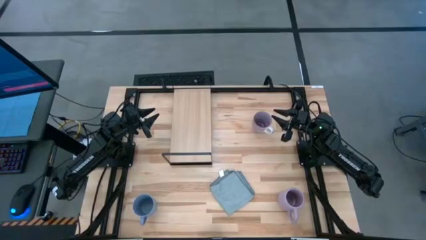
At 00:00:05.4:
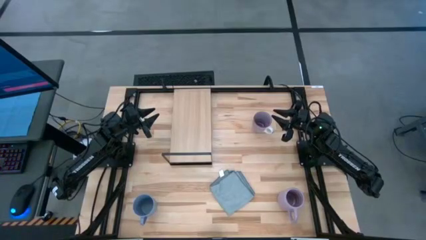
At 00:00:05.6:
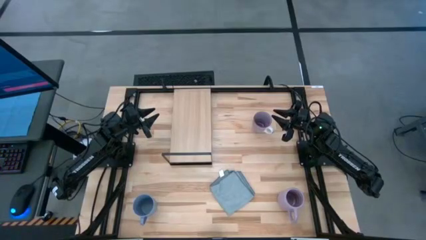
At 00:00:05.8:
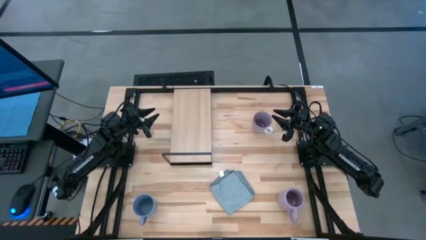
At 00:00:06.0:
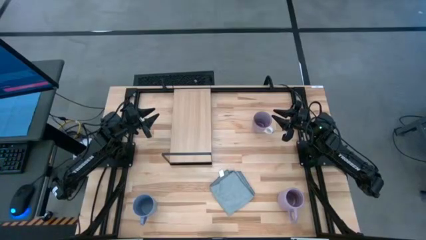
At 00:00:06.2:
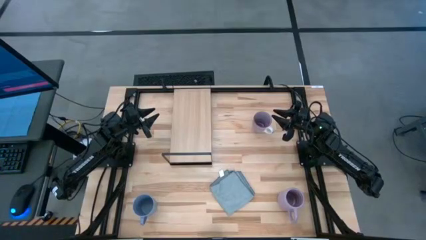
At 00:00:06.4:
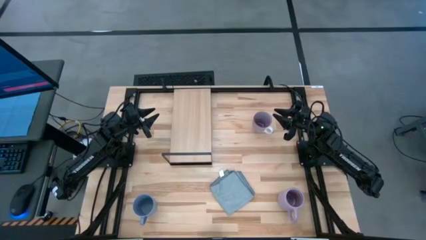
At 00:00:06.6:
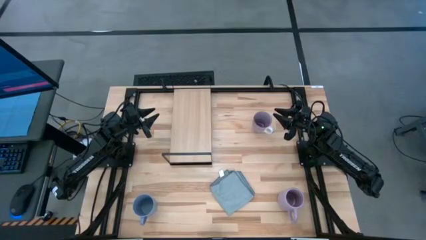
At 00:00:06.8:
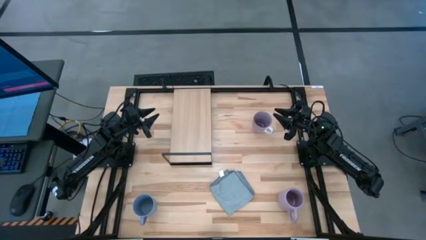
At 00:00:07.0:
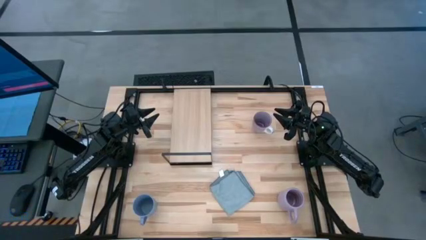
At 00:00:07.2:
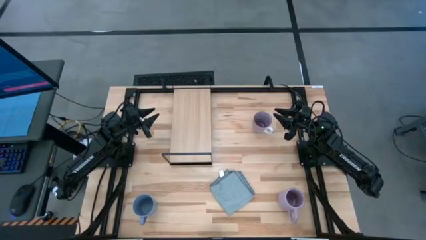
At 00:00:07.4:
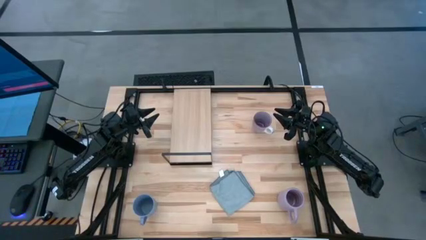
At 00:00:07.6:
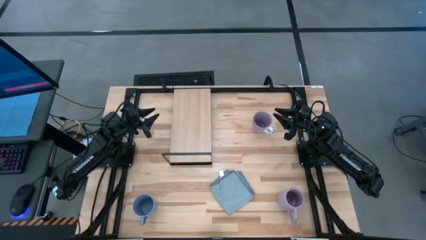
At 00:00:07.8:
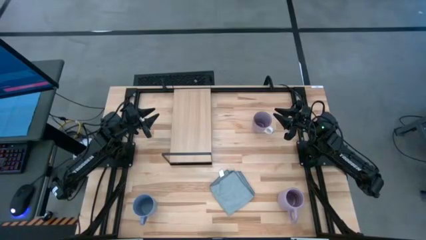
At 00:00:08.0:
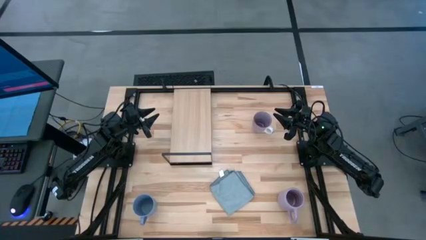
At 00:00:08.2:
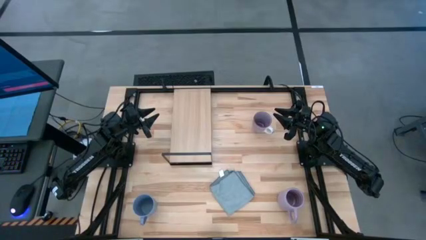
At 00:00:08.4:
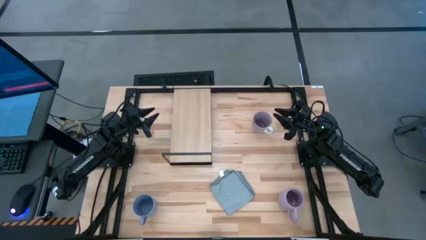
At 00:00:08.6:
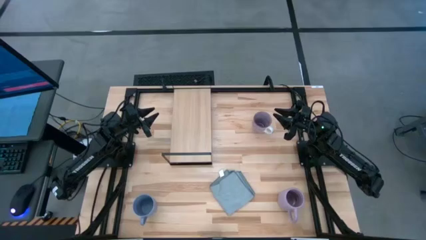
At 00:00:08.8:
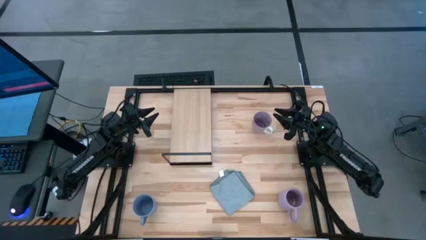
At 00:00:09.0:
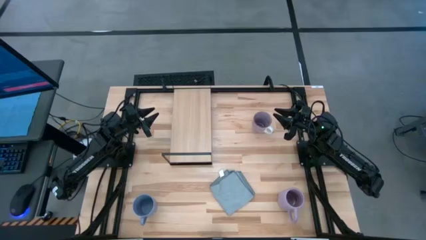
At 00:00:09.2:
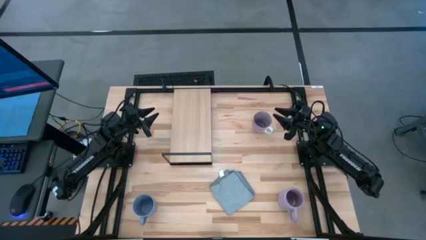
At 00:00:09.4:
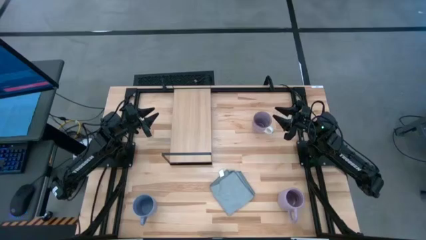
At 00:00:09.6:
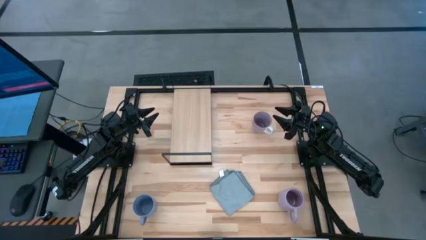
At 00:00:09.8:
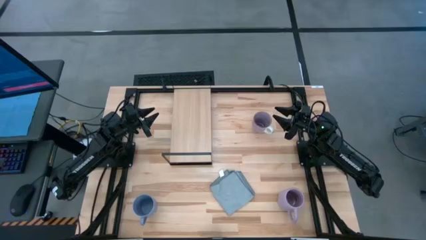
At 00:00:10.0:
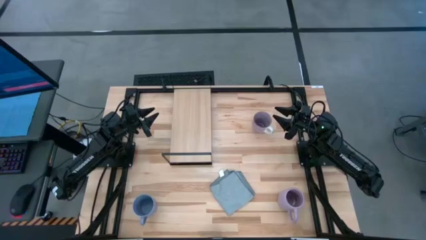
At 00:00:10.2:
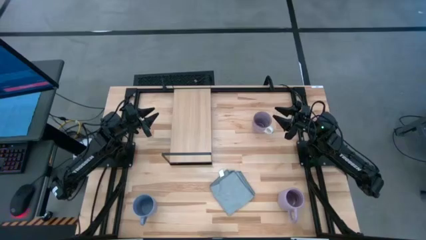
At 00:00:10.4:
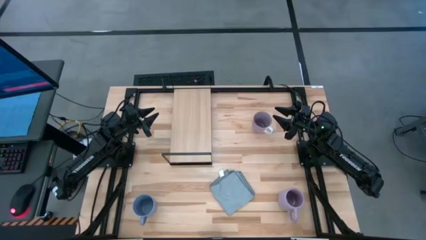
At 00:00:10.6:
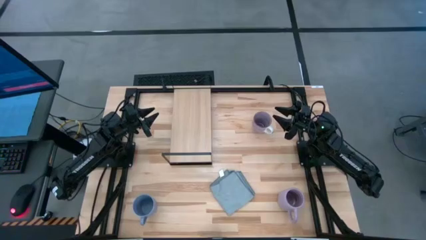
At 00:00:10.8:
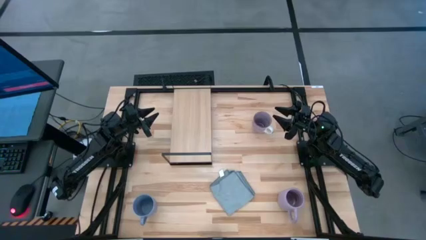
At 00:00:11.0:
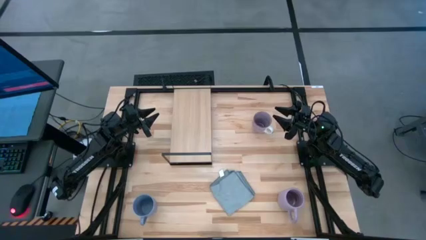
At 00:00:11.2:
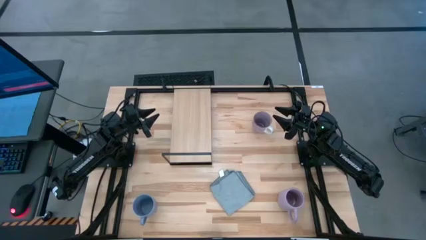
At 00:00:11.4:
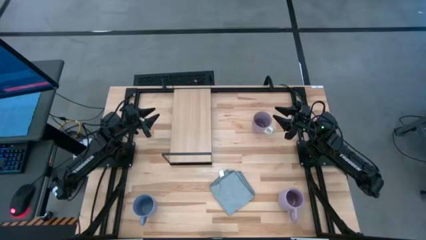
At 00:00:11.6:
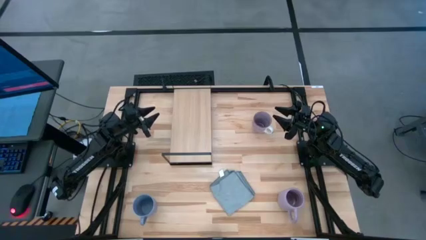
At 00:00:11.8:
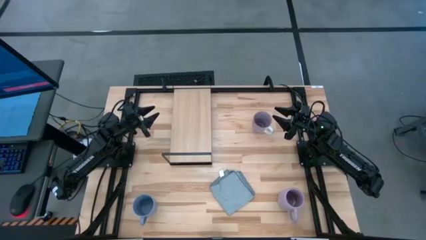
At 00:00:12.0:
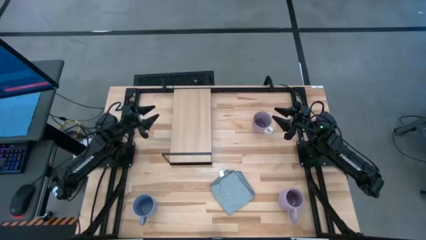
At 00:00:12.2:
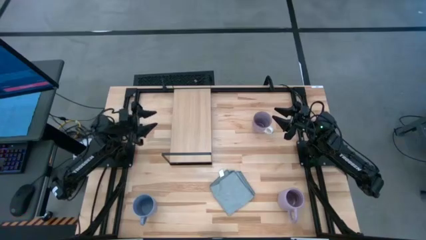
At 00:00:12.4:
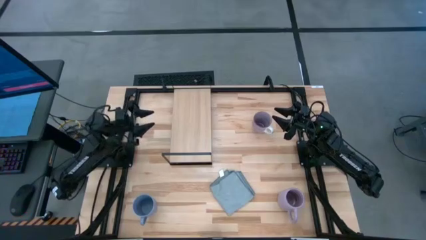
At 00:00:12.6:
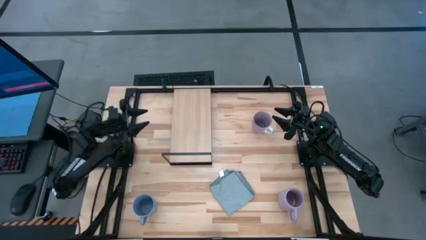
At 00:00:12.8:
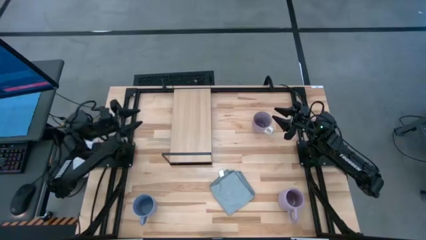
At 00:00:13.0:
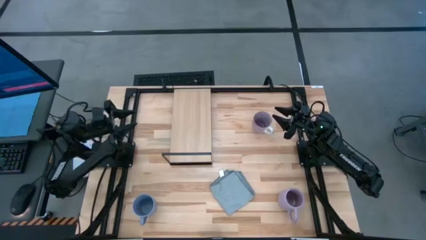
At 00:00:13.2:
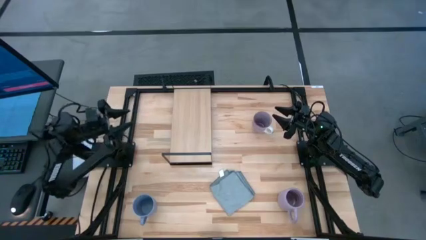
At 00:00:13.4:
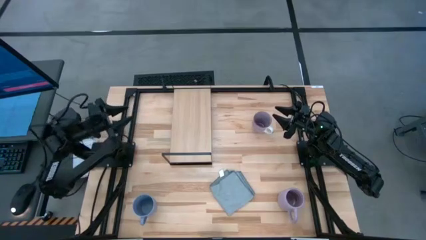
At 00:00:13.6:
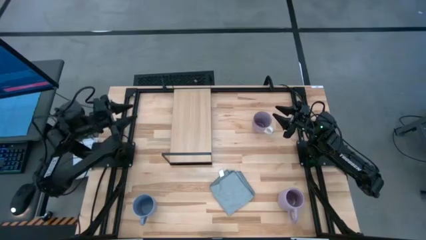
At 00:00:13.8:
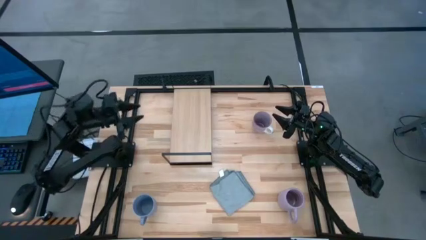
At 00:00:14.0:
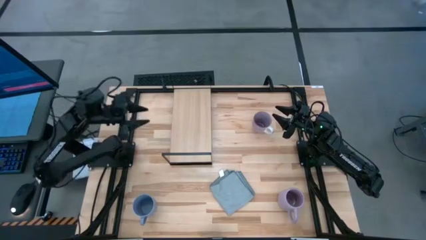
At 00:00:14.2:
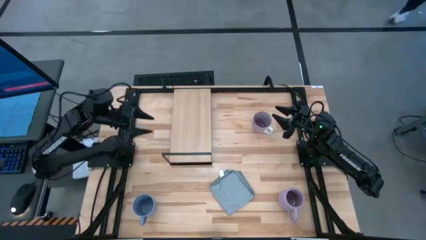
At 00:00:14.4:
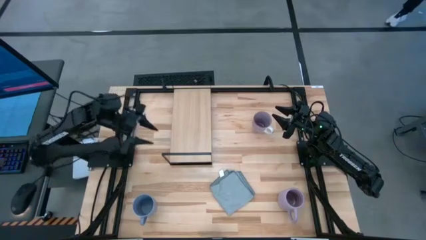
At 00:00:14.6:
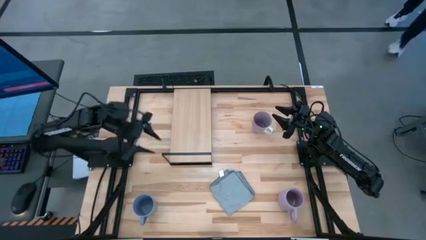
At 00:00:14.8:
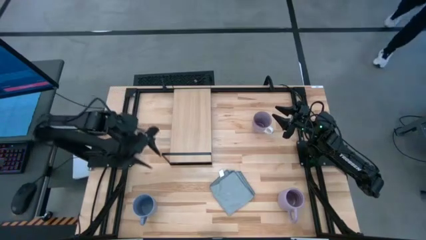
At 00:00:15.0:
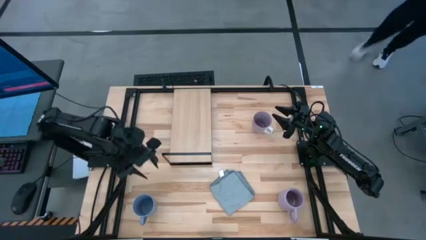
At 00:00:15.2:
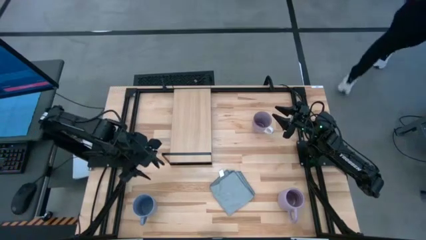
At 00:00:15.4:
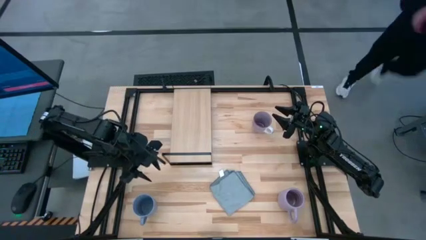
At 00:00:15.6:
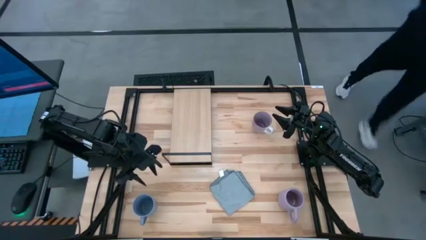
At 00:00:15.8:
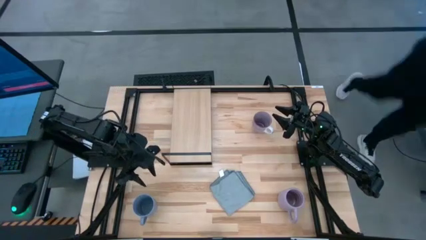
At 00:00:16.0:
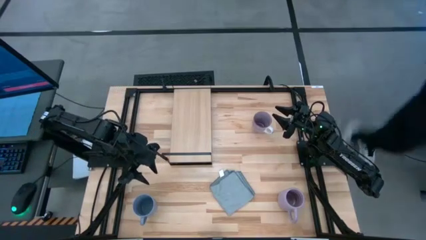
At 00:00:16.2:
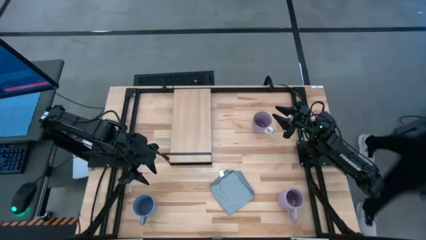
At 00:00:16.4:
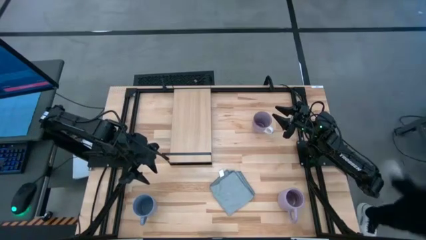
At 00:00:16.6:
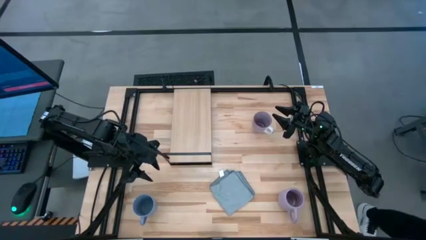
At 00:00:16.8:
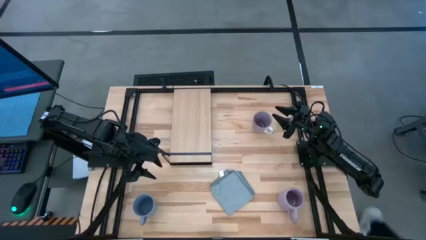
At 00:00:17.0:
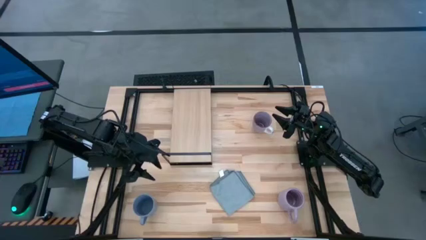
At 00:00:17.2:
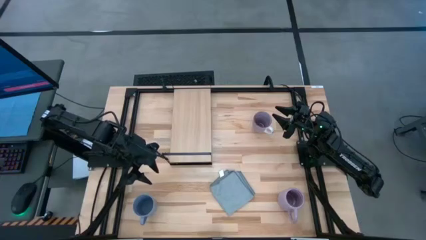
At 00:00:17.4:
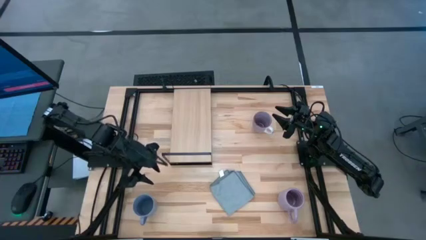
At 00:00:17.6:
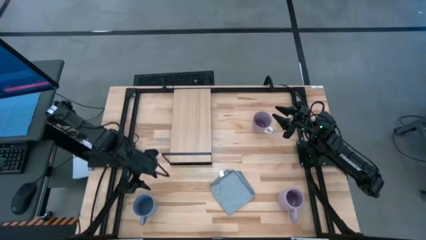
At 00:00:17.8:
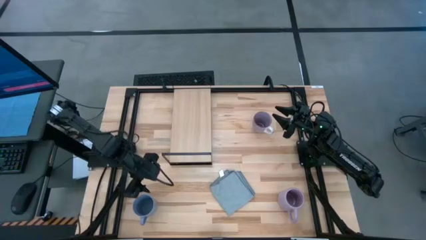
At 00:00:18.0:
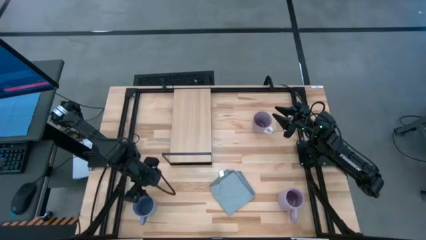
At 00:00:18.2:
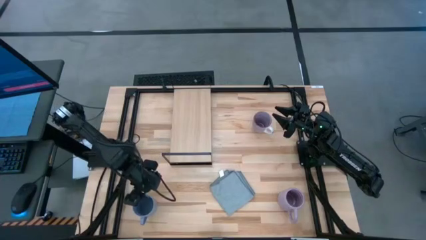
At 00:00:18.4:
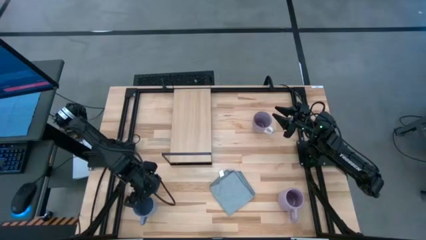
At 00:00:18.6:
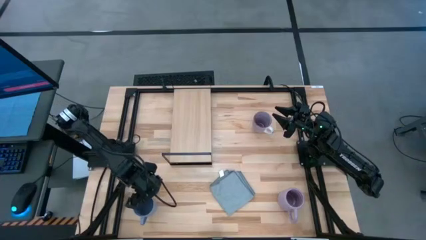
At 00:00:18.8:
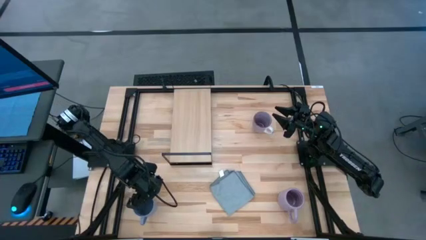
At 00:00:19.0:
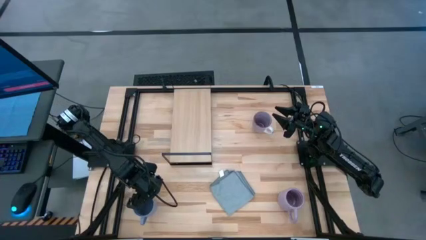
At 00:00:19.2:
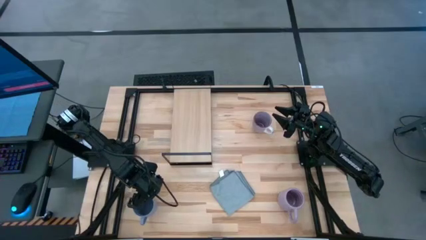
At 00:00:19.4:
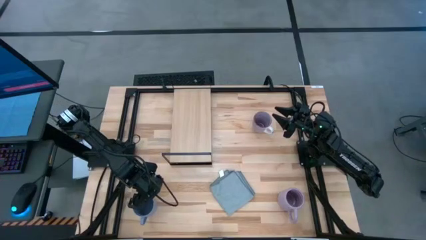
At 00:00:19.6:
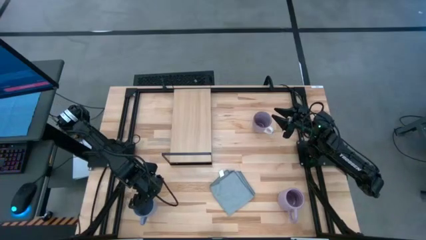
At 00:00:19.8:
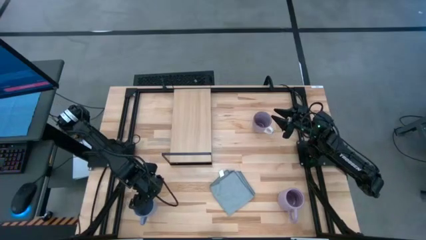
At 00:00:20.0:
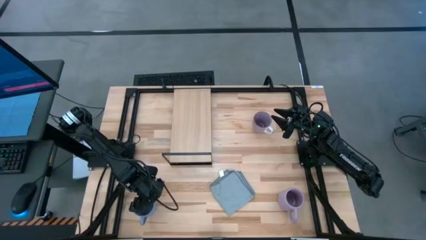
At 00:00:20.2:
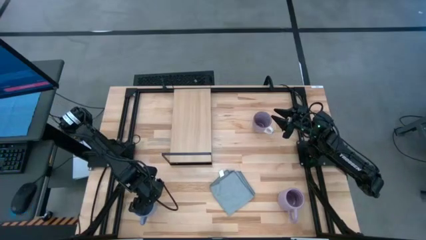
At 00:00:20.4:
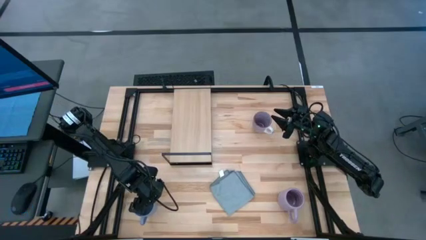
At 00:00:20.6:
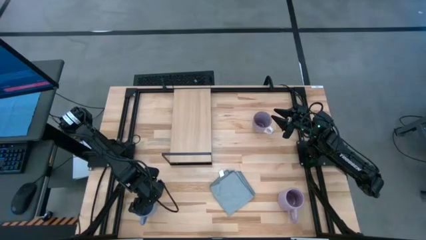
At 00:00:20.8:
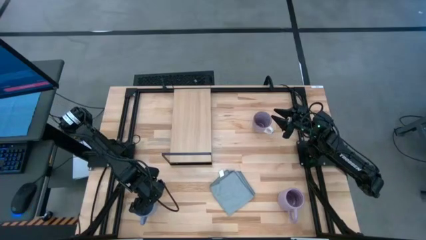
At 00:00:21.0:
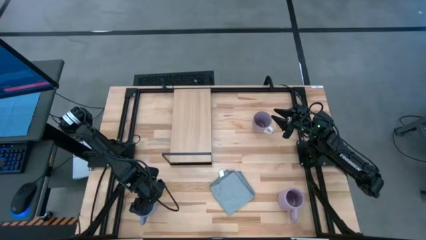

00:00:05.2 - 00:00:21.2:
Task: Stack small to large cups/mugs on shelf
Put the blue cup on the shelf
